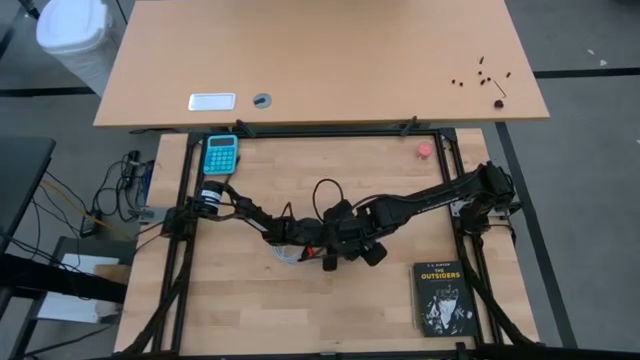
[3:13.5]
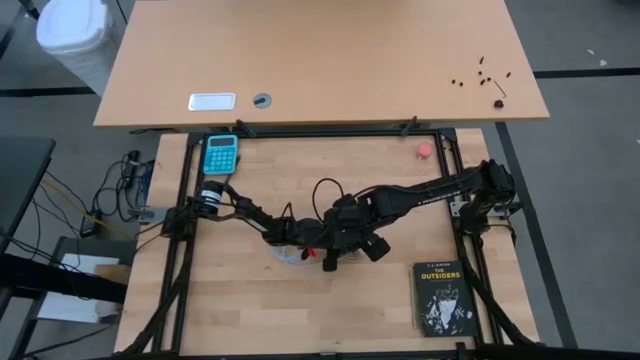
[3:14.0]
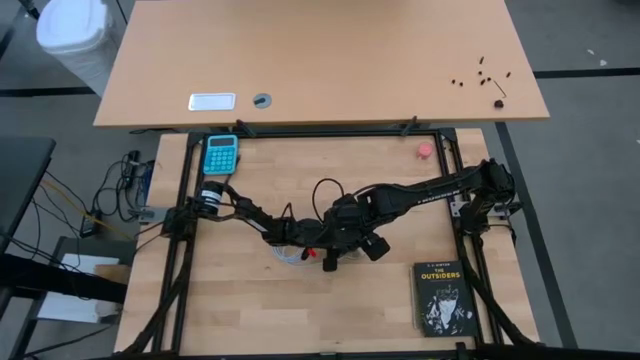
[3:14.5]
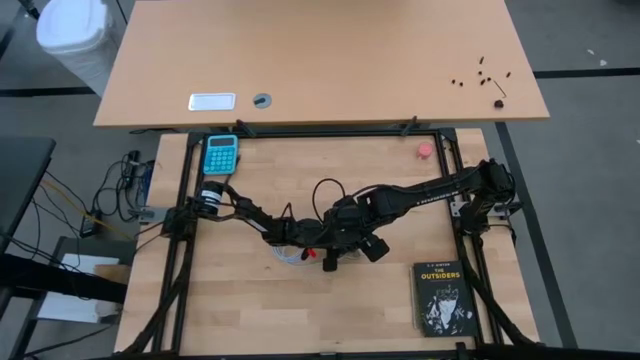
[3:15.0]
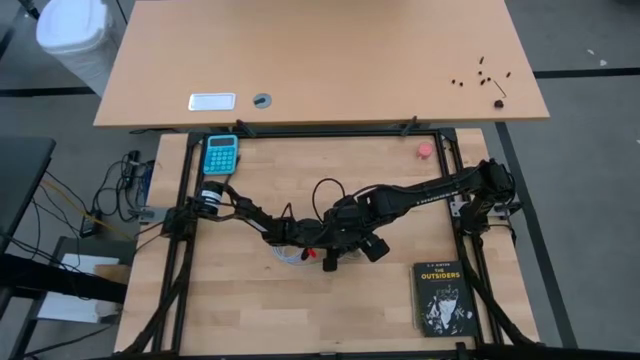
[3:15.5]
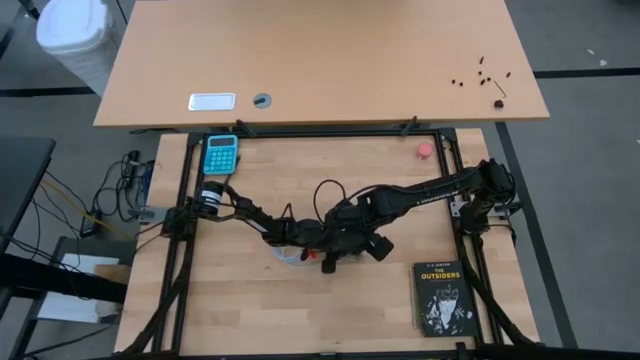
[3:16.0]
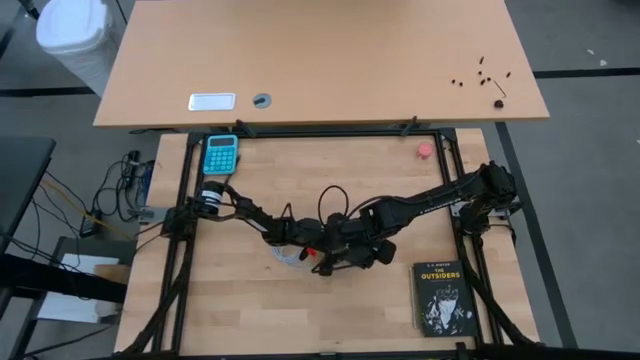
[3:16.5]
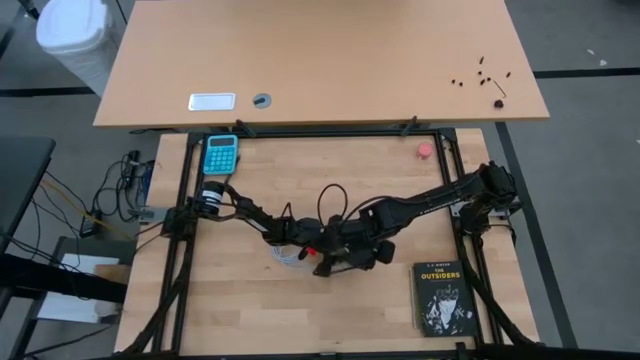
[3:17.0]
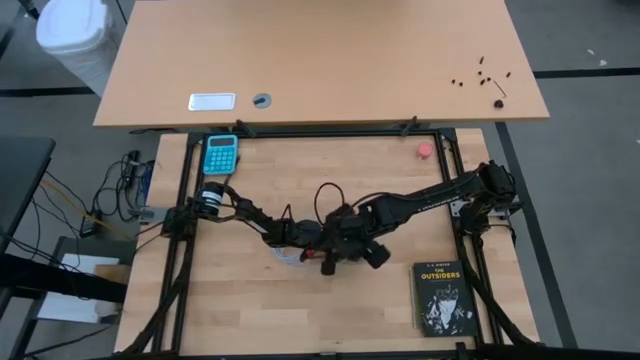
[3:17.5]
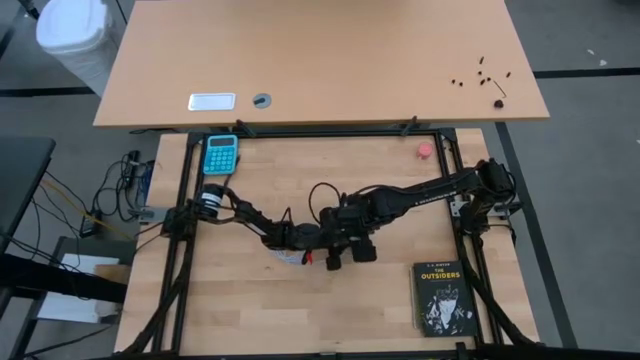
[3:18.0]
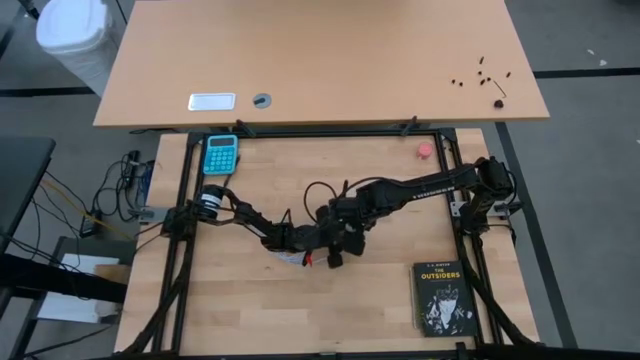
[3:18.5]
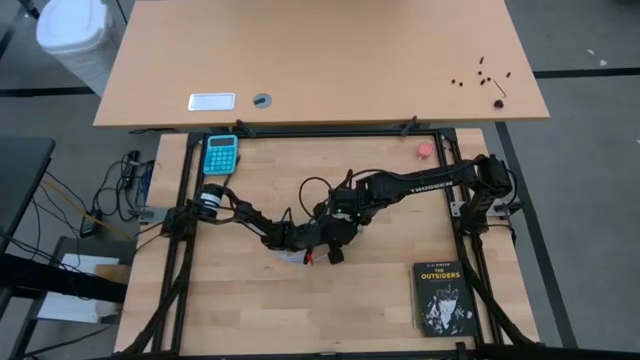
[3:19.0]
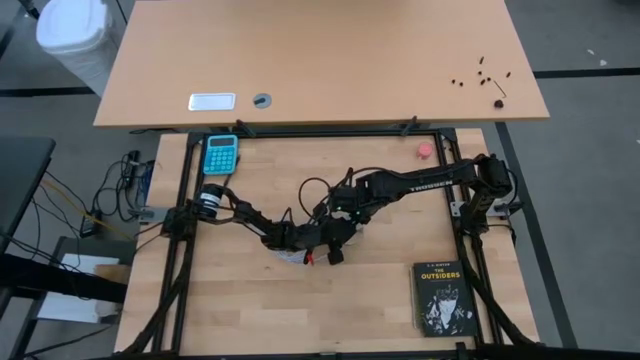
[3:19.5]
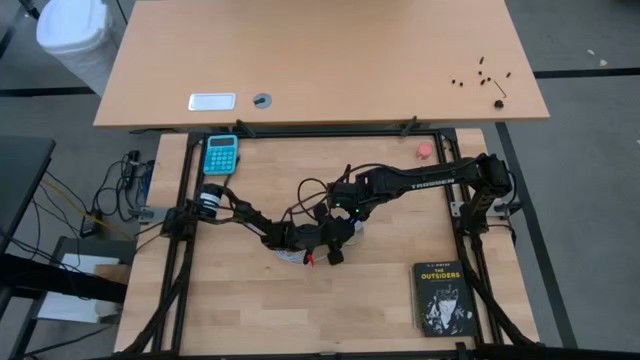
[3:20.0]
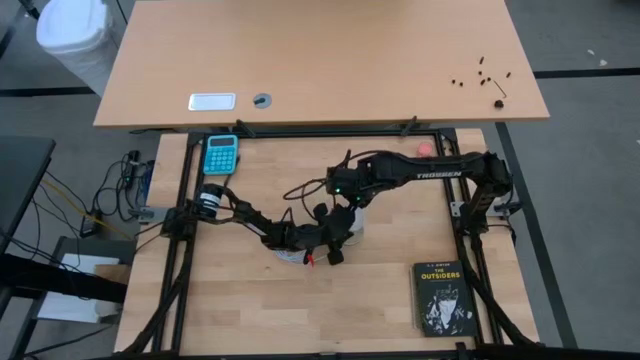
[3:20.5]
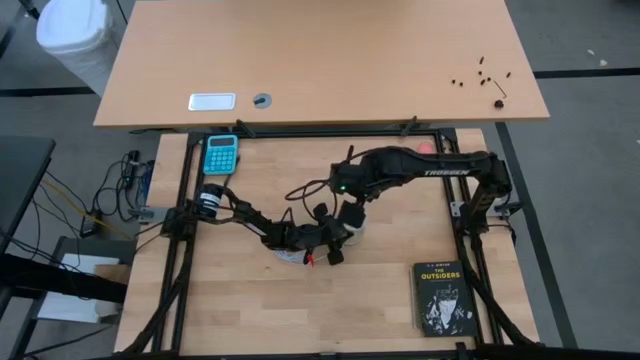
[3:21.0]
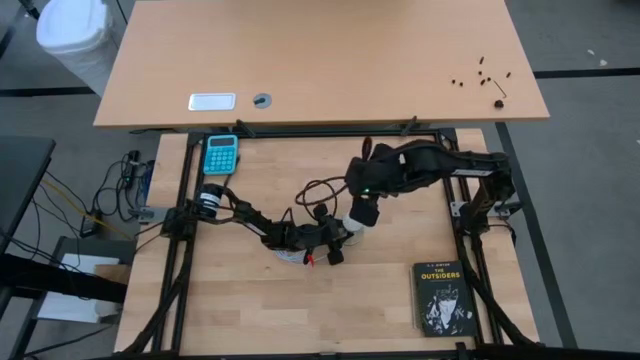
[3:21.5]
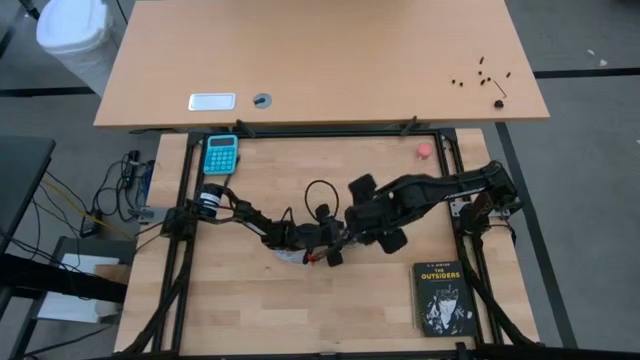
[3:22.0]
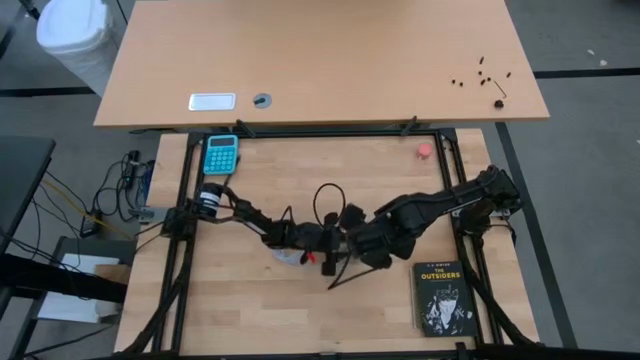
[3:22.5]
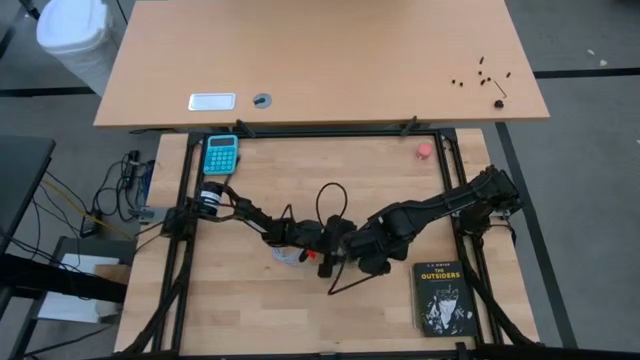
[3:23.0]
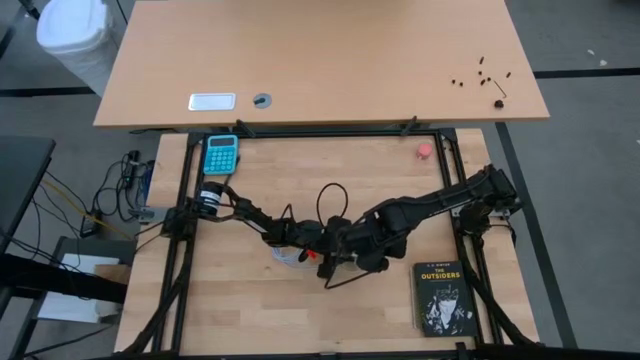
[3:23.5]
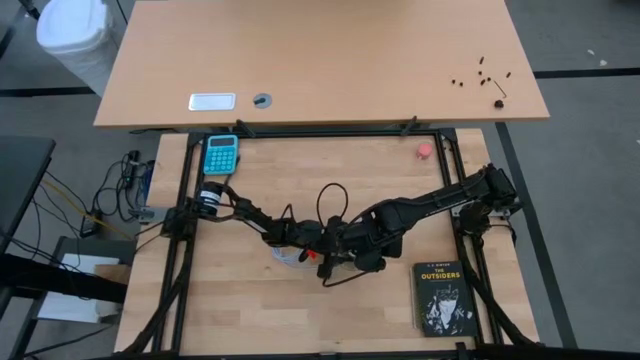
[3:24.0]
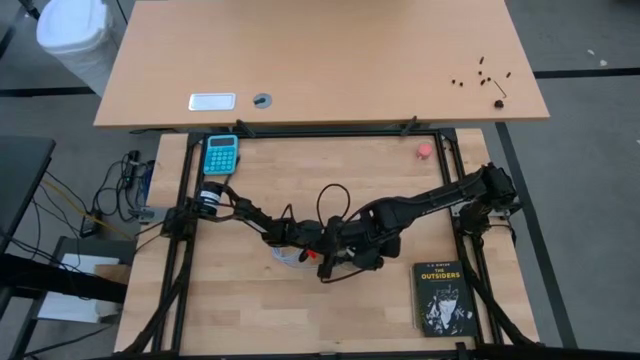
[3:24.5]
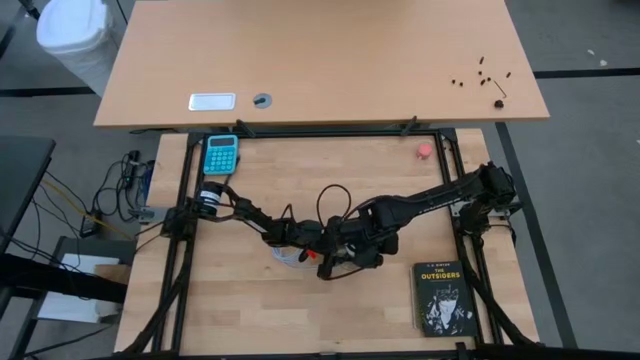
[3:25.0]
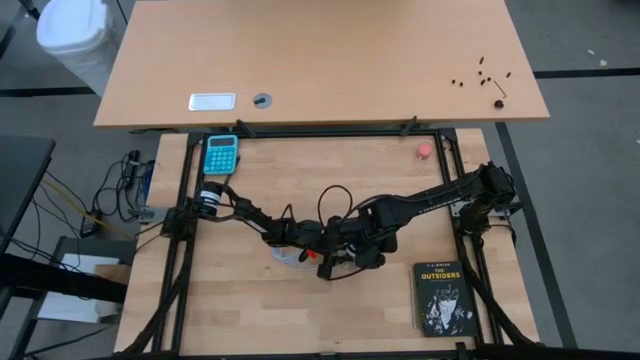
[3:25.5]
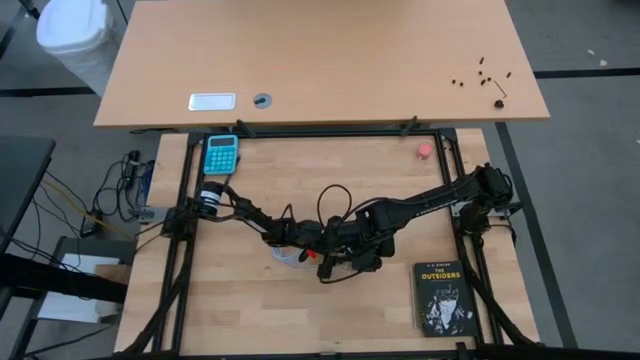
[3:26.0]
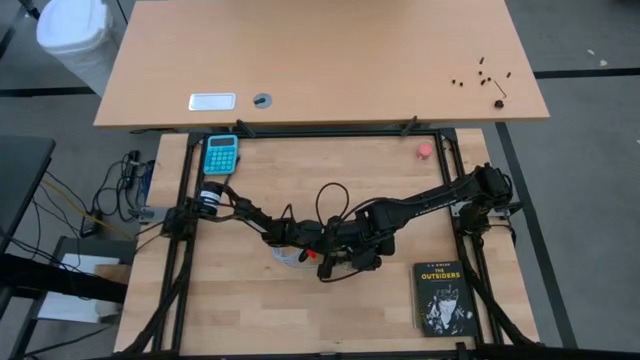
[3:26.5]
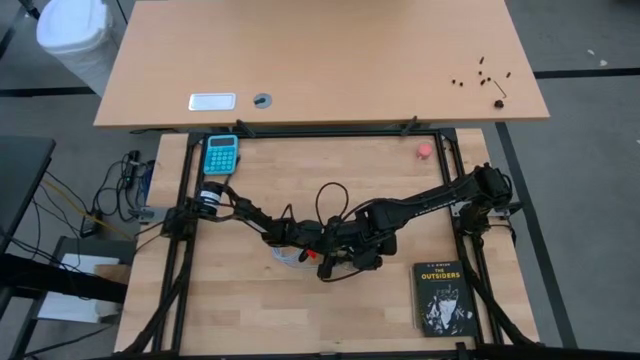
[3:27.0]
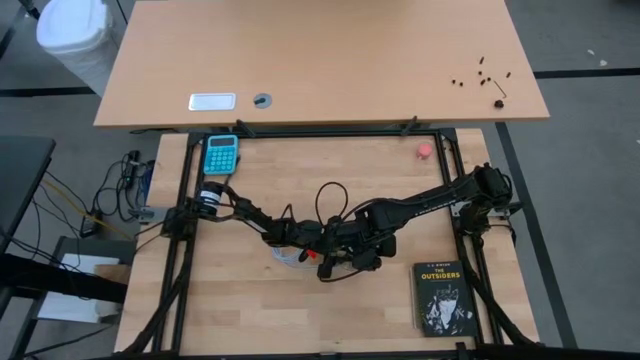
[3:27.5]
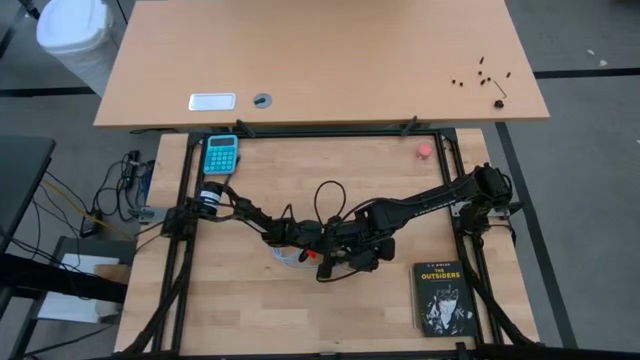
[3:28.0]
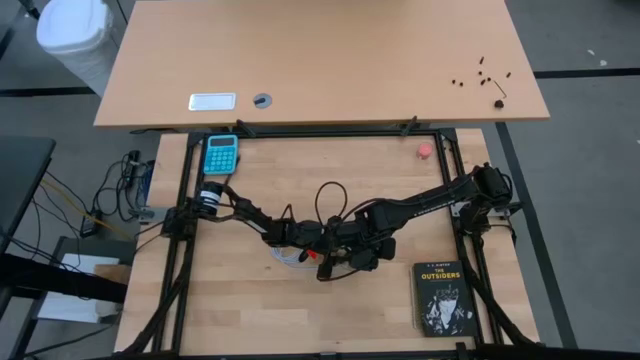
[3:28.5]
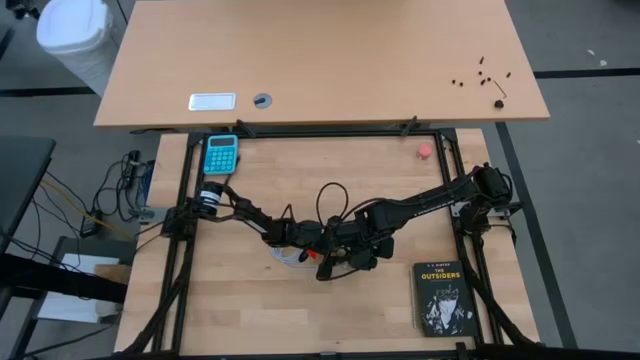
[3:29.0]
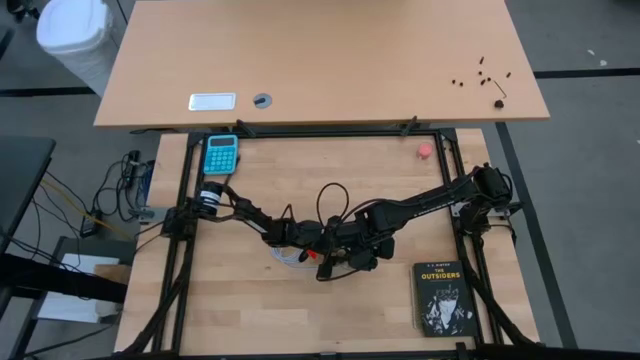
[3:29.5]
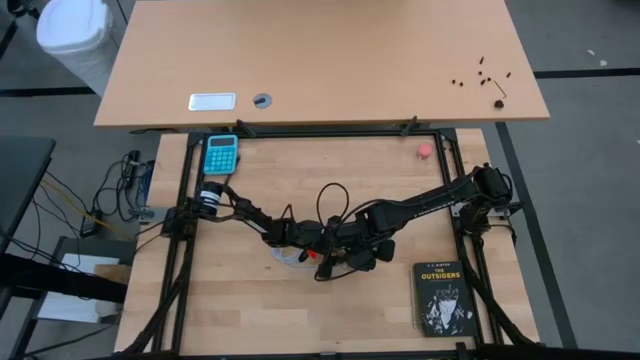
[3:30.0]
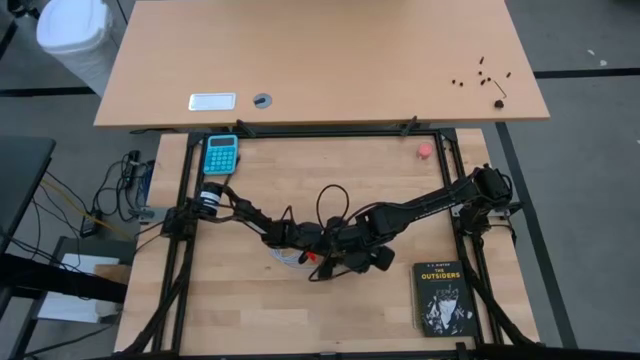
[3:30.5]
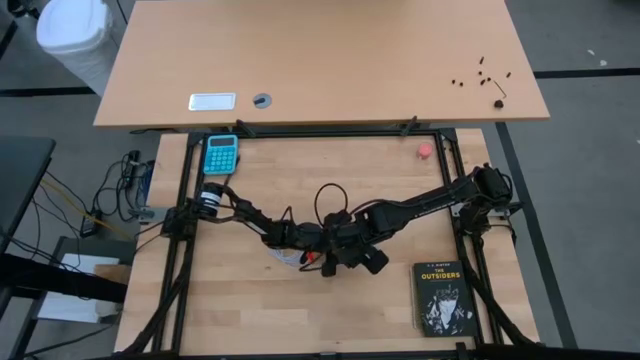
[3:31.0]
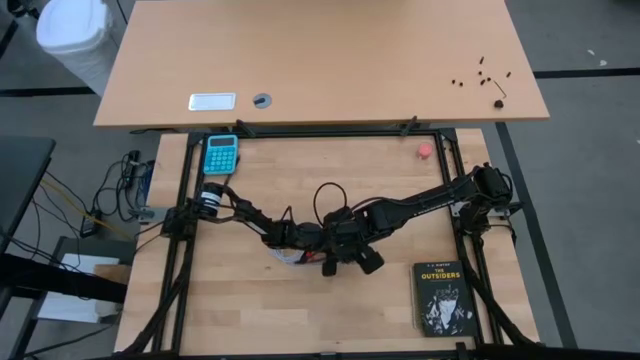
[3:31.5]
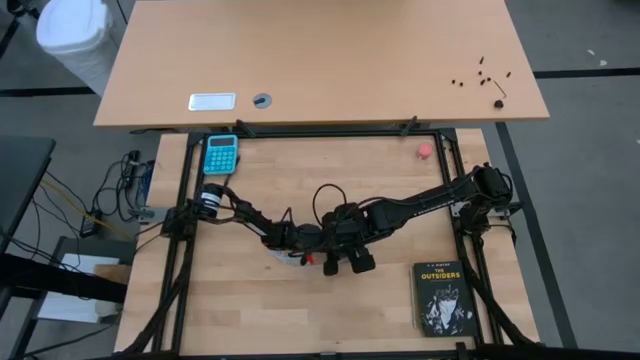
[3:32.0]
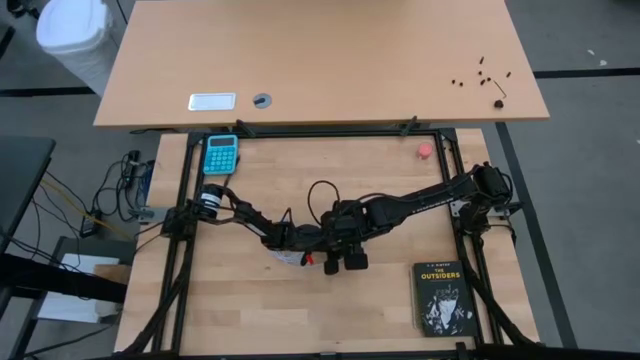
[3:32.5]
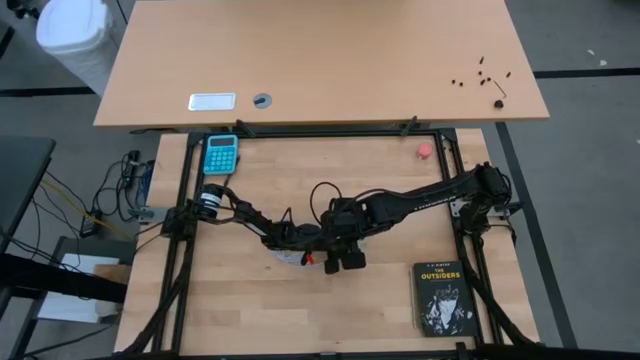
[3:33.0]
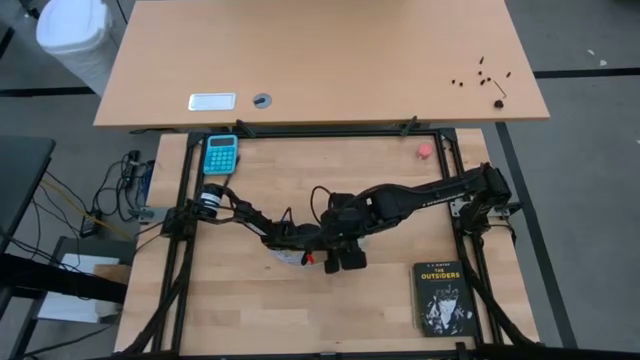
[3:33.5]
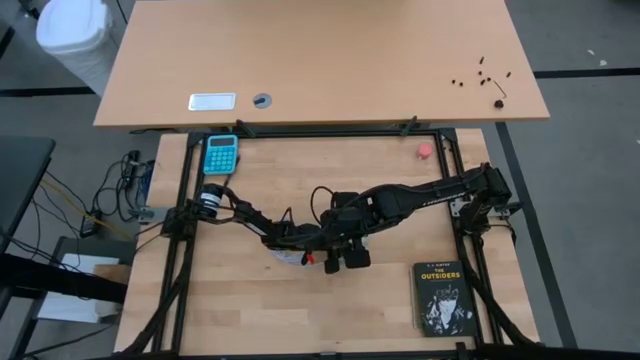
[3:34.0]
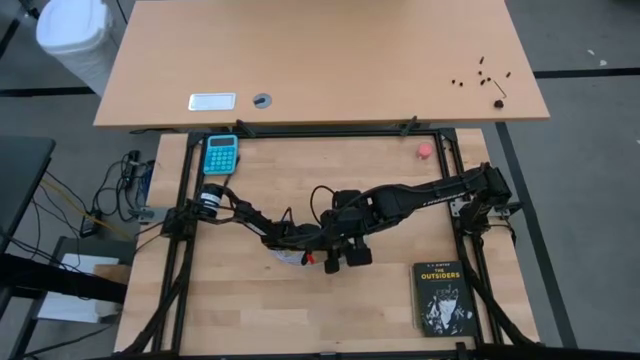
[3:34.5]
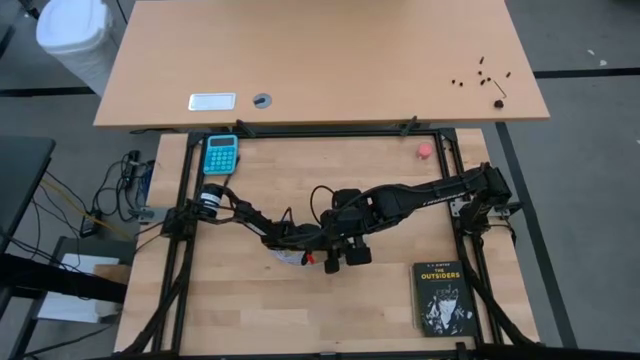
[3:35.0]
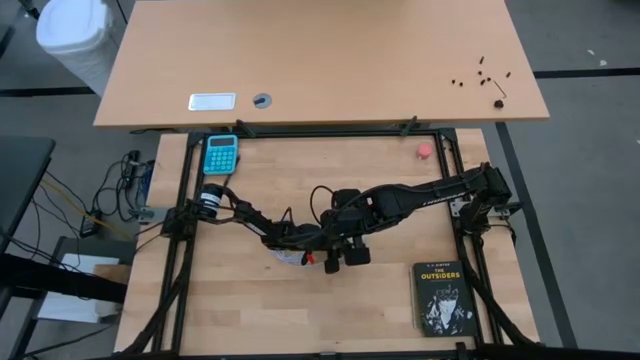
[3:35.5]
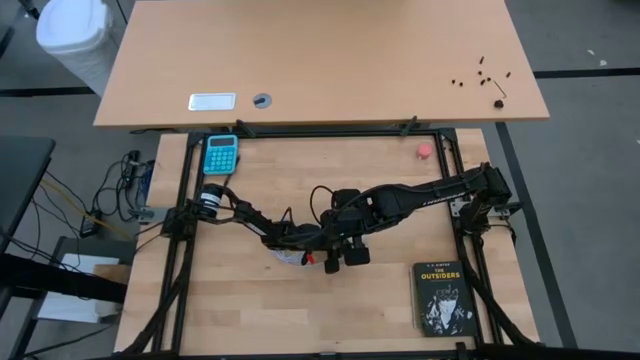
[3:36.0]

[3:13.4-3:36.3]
Task: Screw lightbulb
Insert the lightbulb into the lamp
